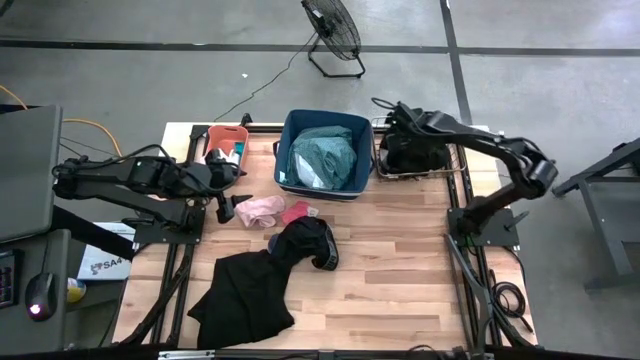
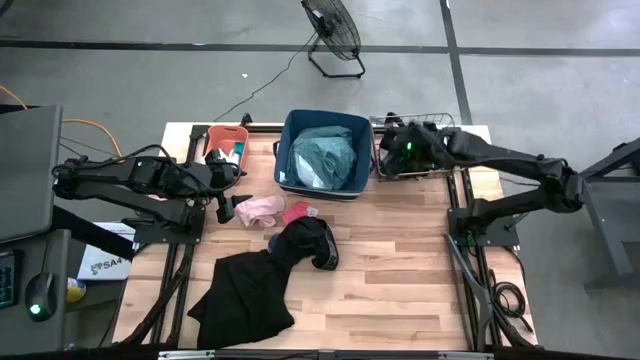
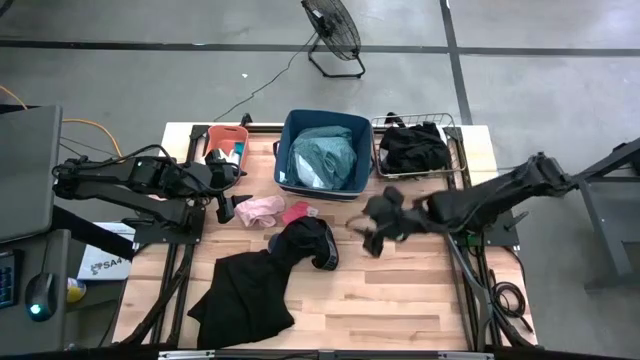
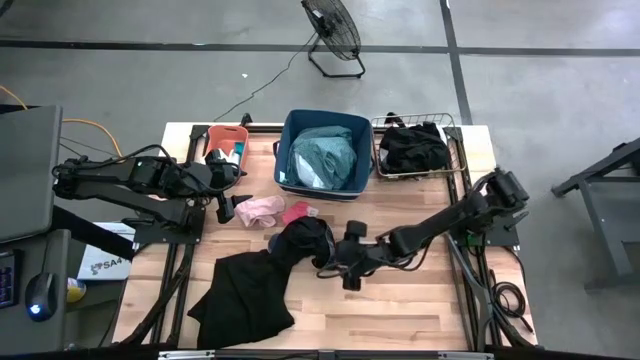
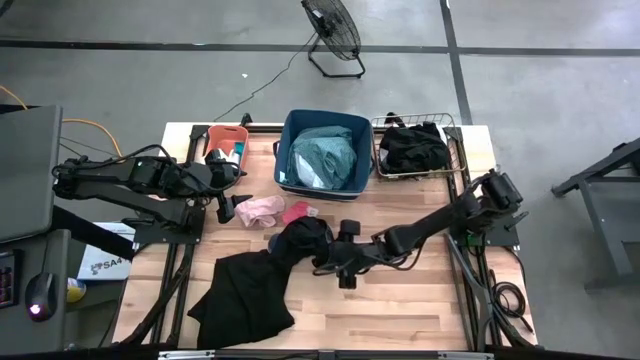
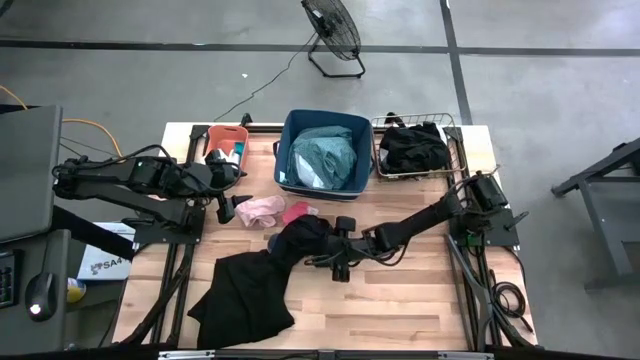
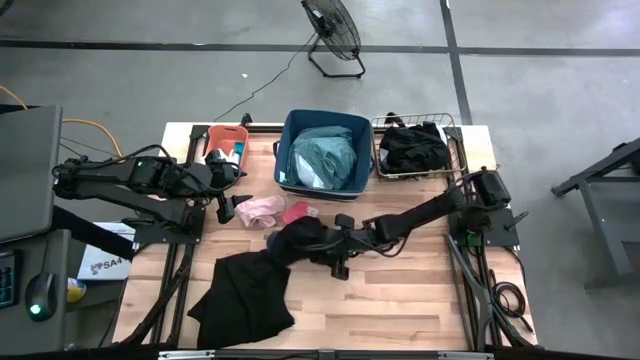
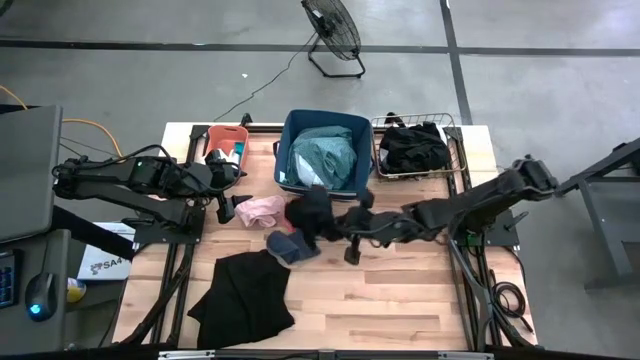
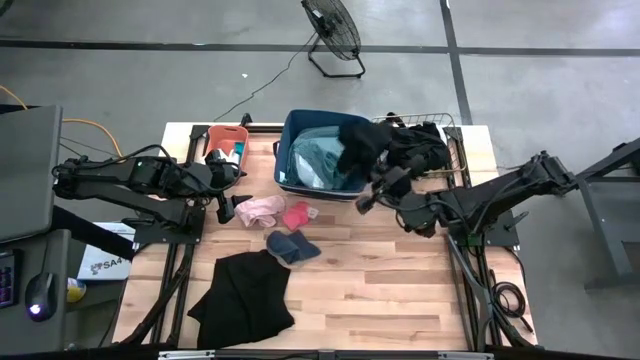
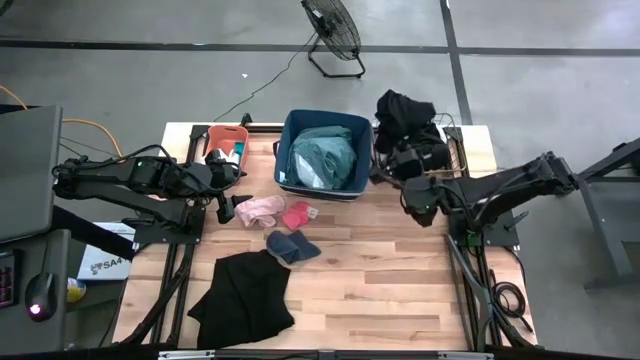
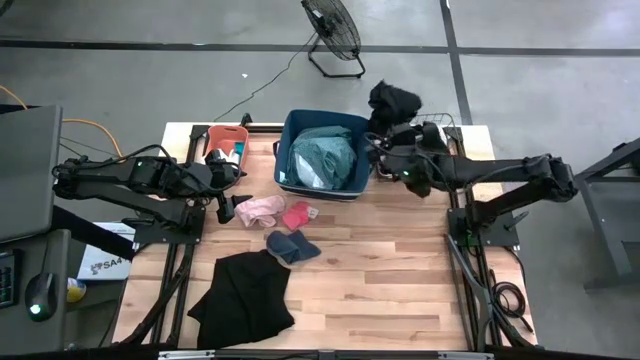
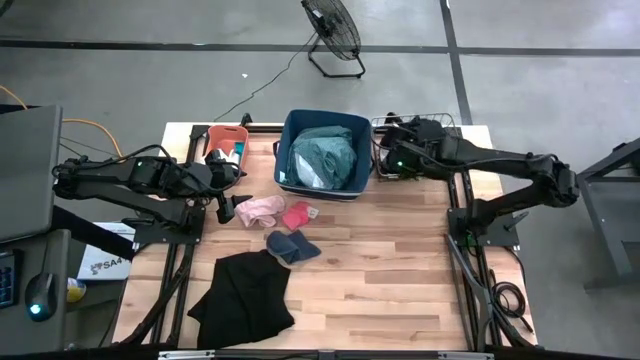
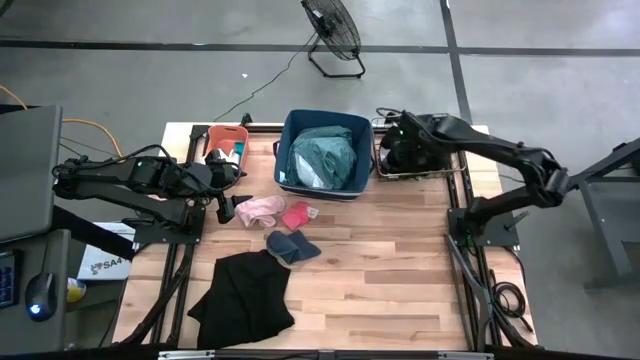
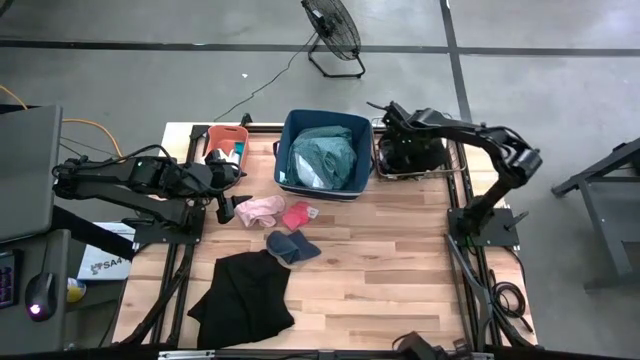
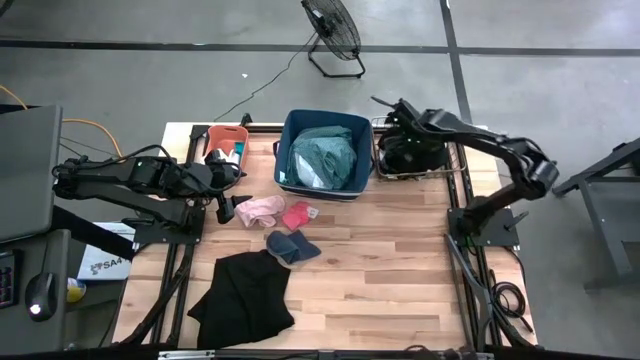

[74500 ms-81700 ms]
Task: Pick & Place Cloths
Put the black boxer into the gold wire basket

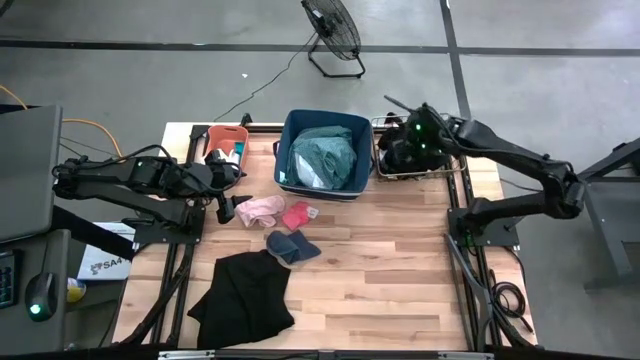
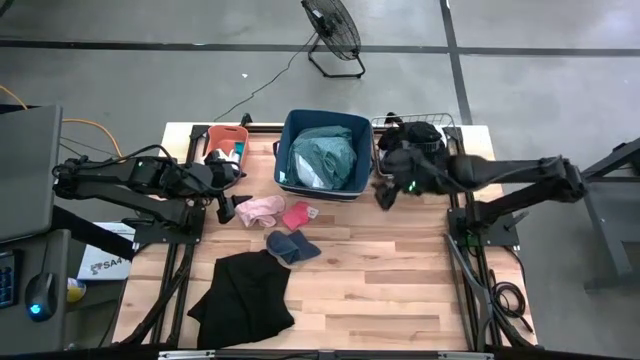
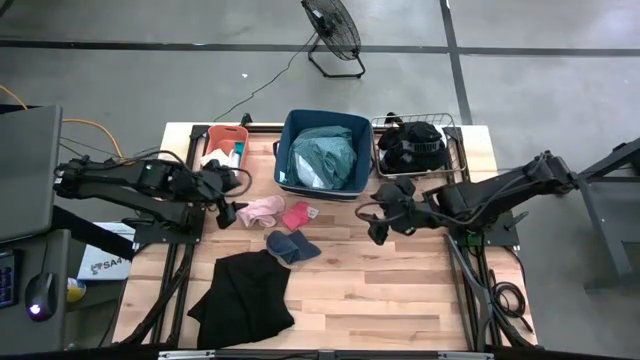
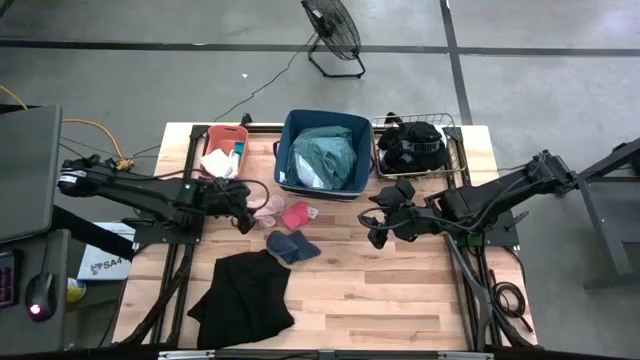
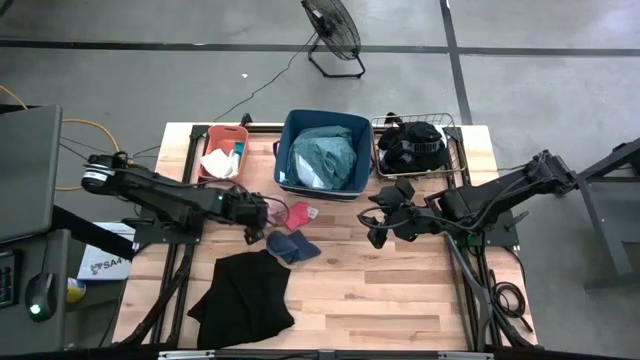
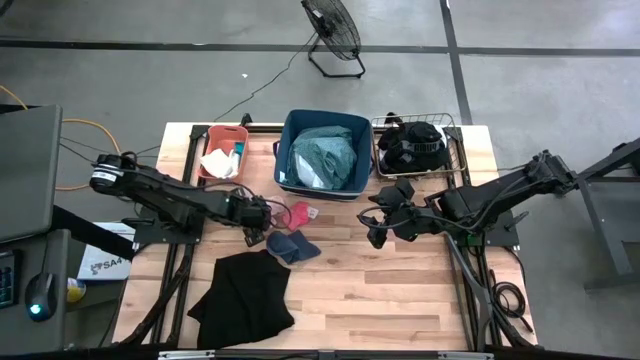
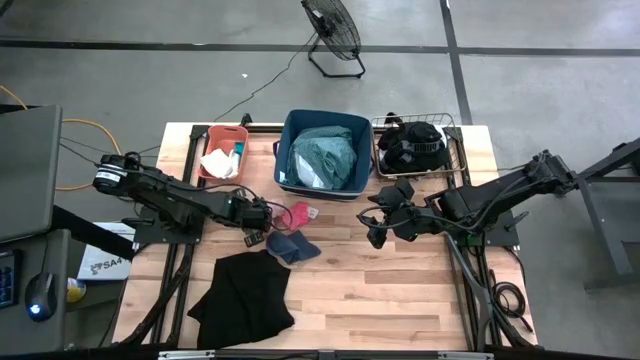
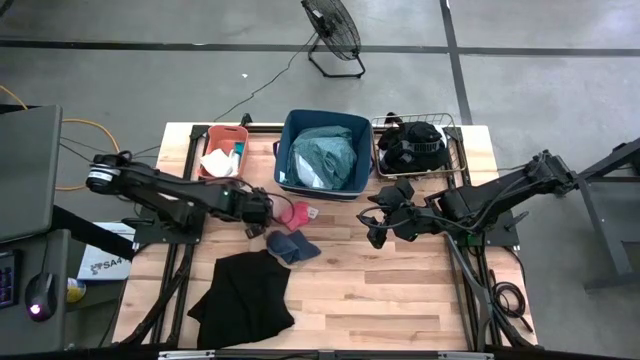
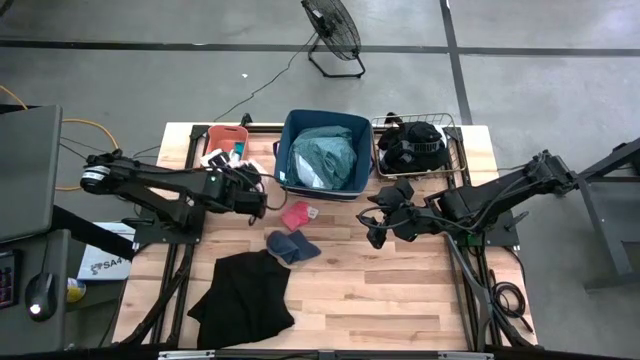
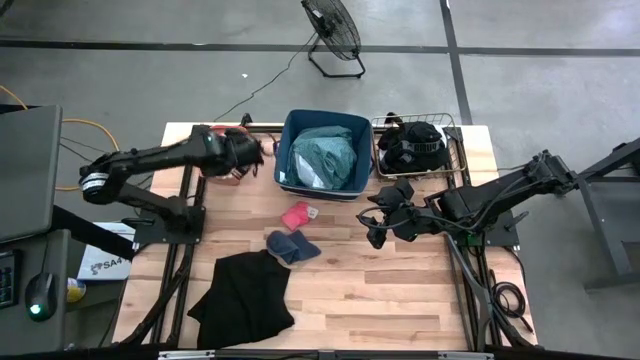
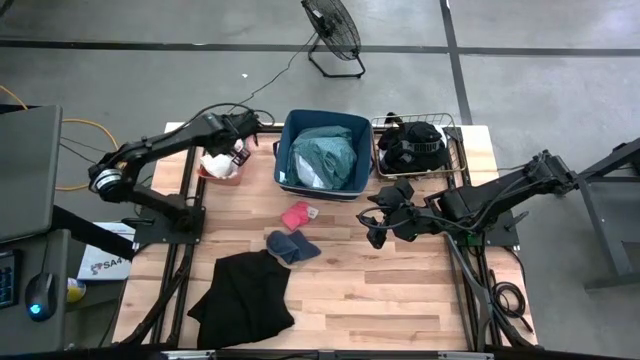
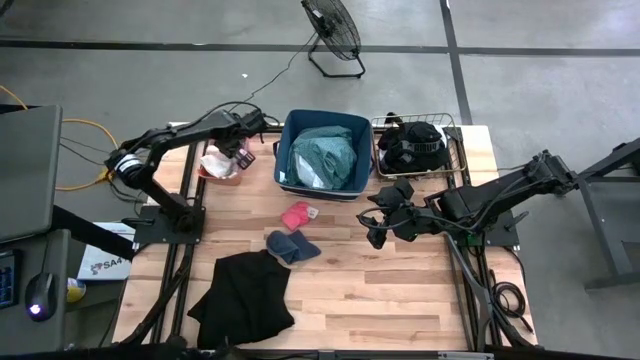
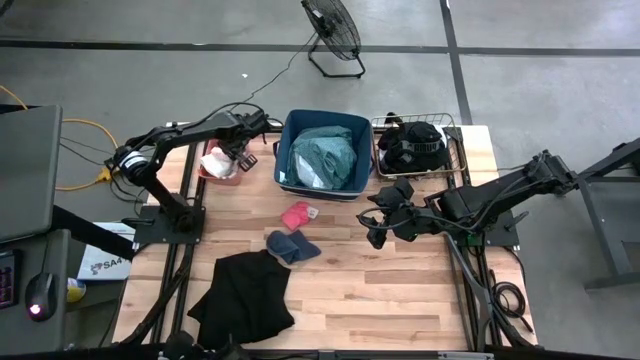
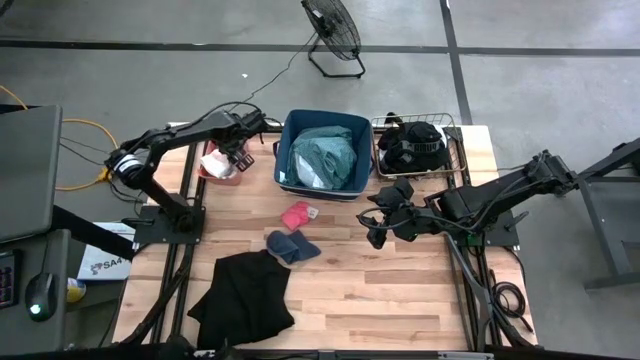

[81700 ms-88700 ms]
Put the light pink sock into the orange bin

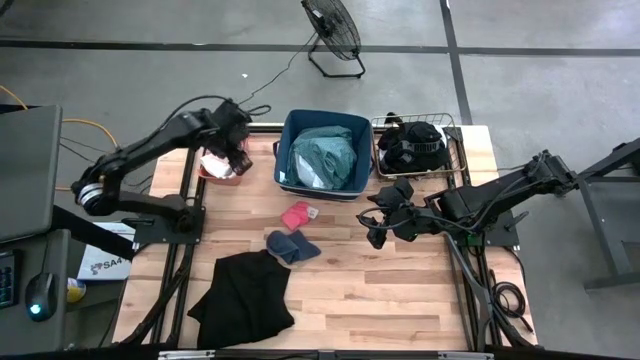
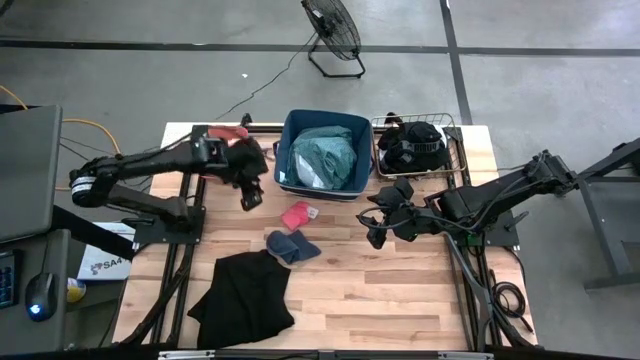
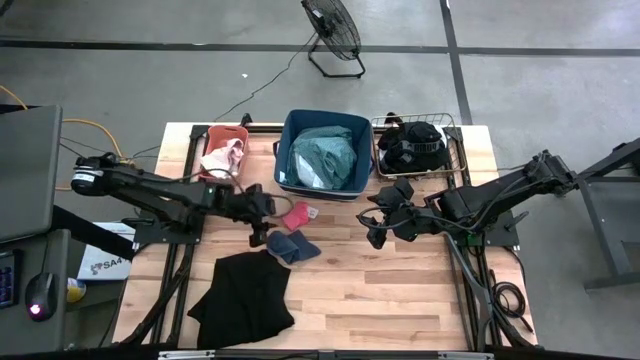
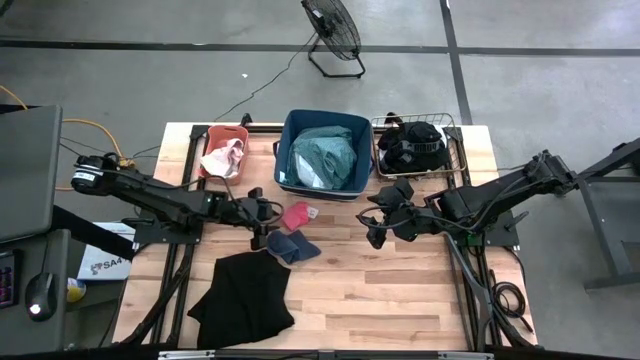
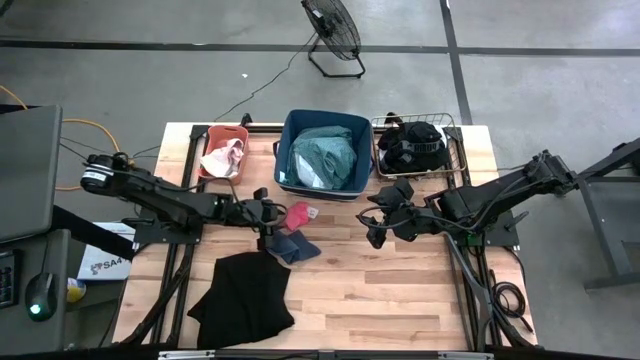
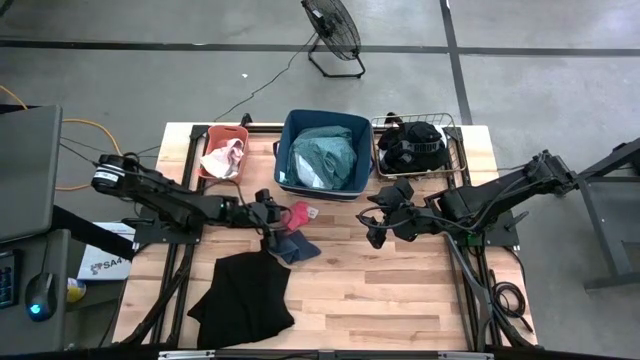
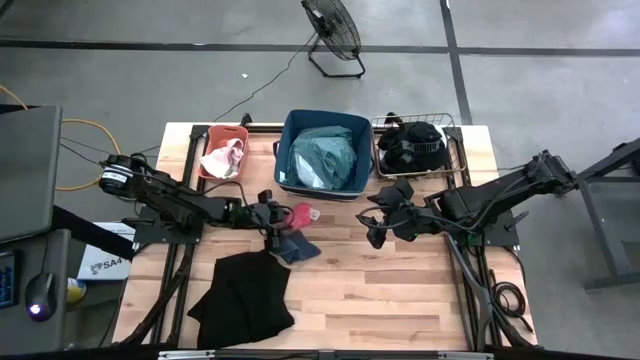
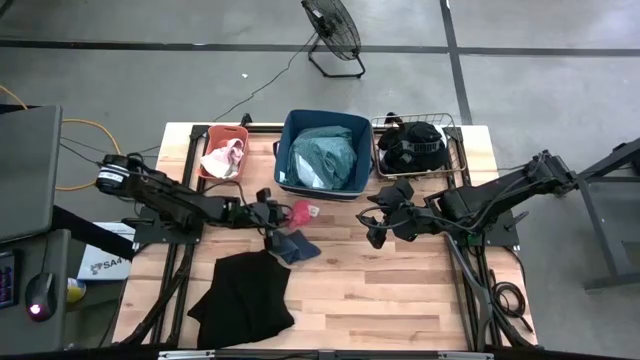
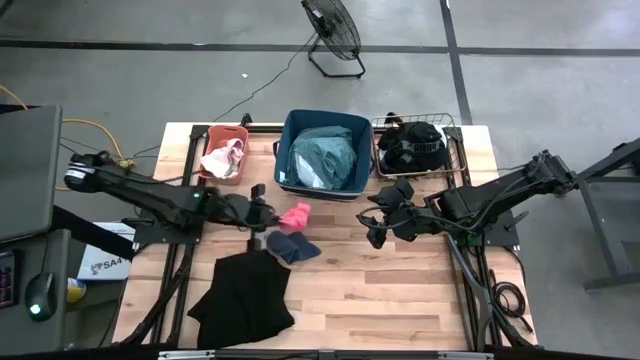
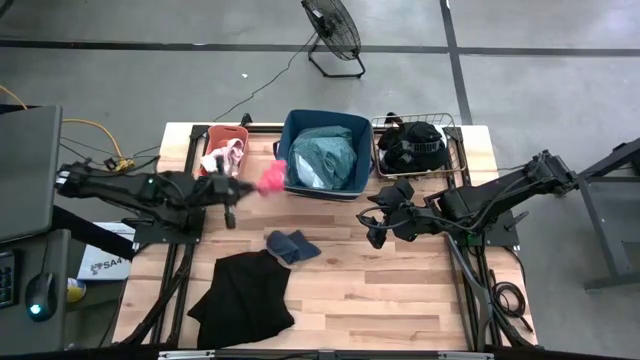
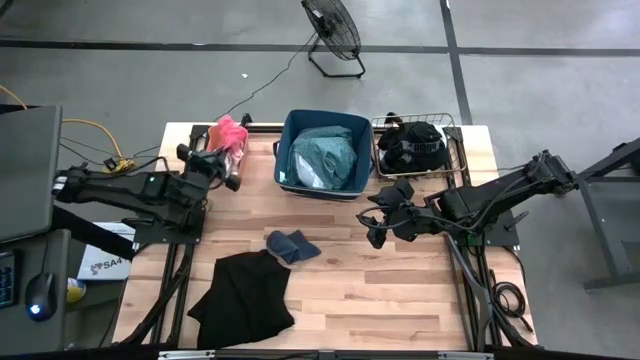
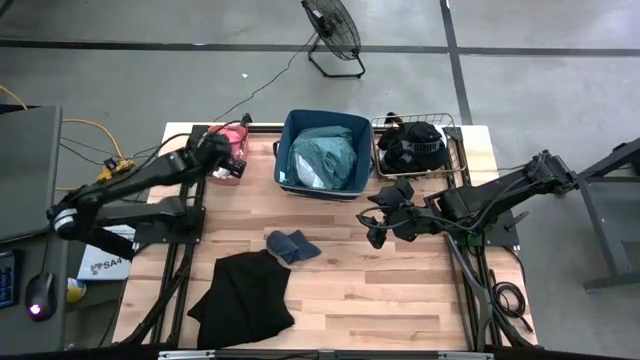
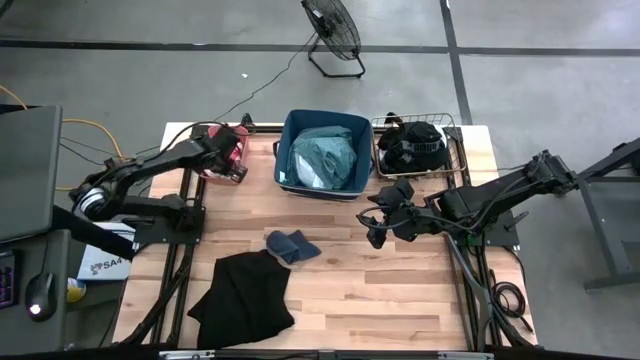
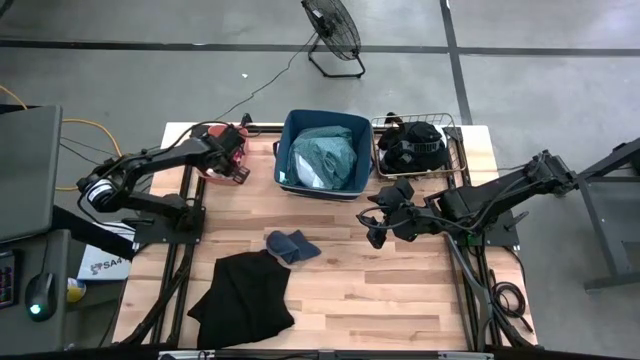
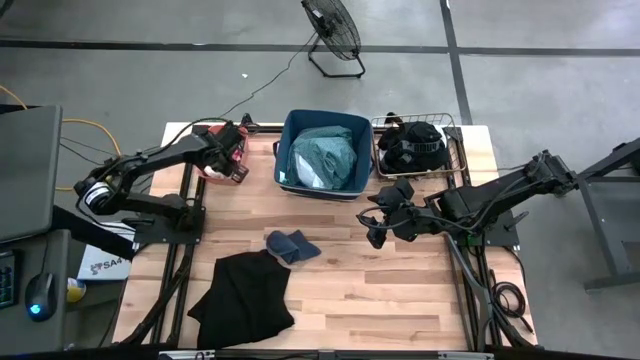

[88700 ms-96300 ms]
Put the pink sock into the orange bin

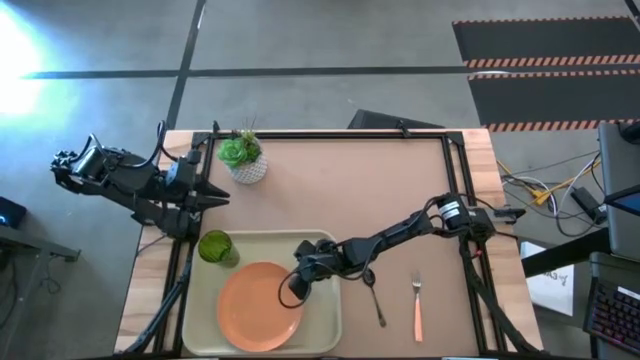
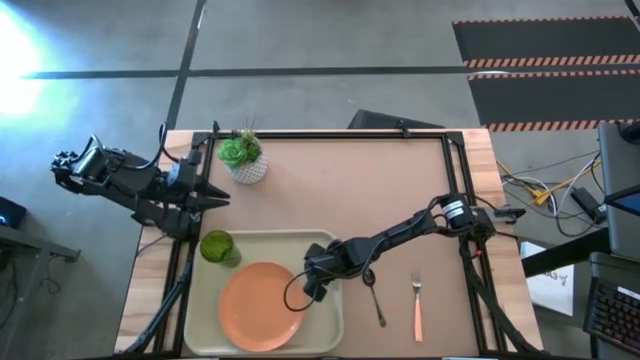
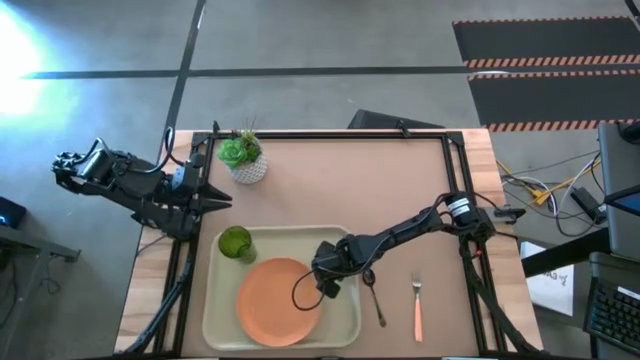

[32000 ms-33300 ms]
Task: Pick and place plate/cup/fork/spoon on tray
Adjust the orange the white tray near the black spoon
